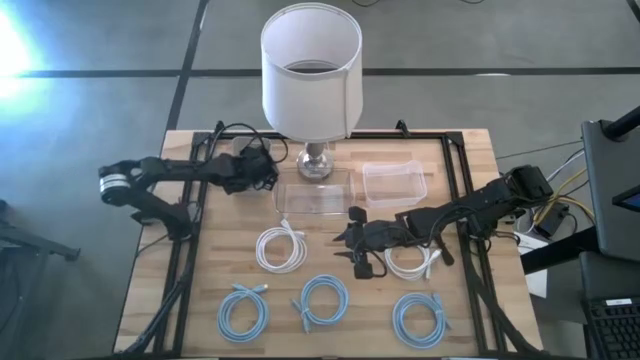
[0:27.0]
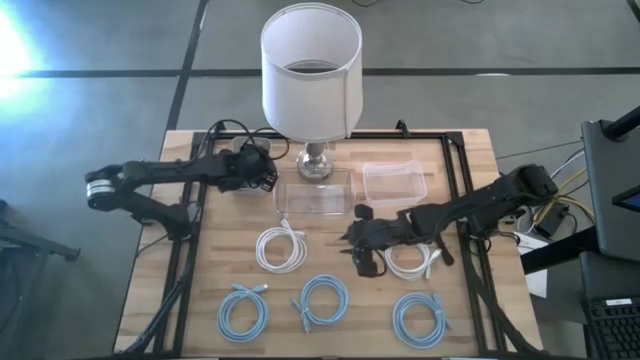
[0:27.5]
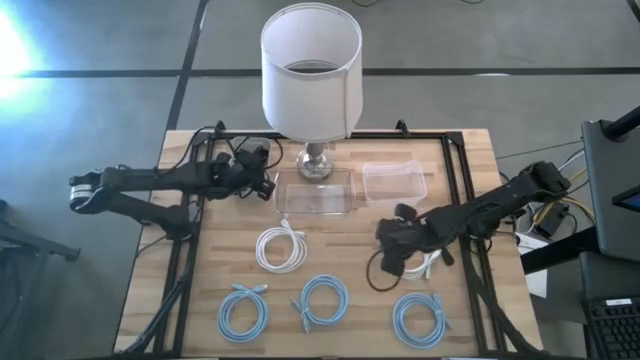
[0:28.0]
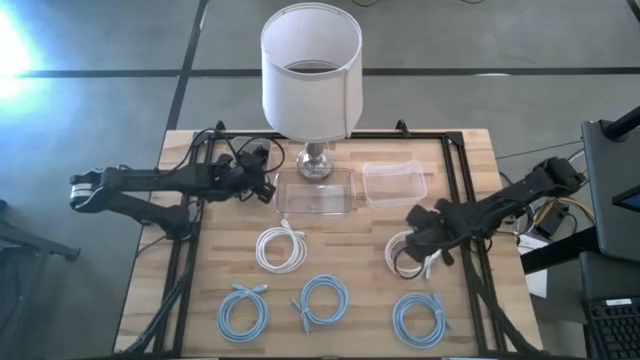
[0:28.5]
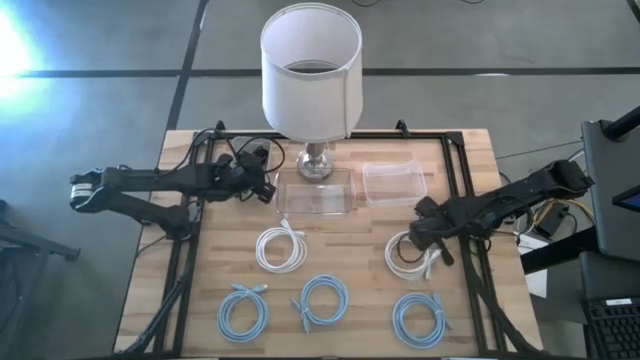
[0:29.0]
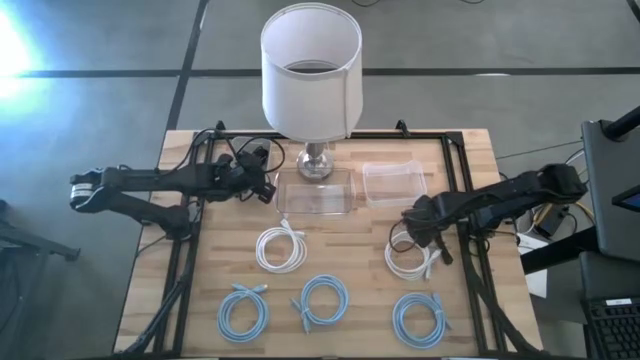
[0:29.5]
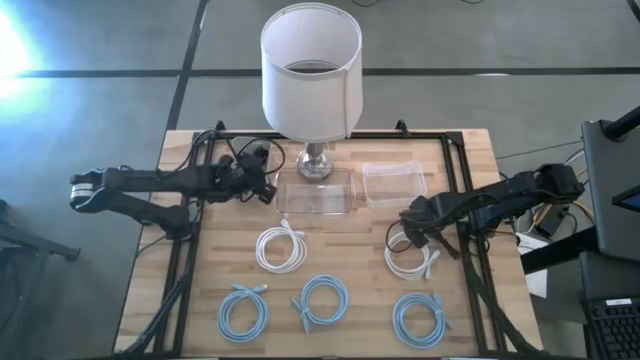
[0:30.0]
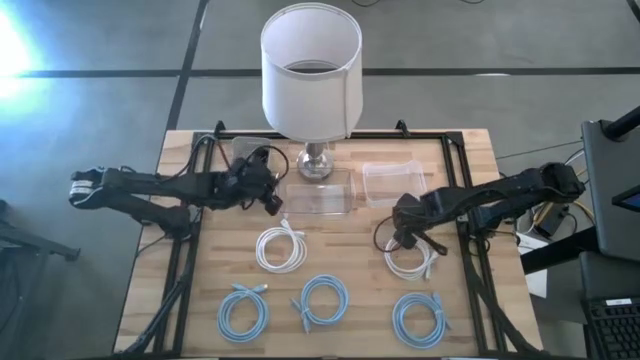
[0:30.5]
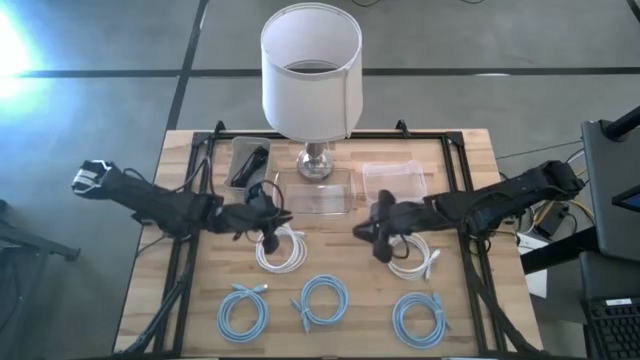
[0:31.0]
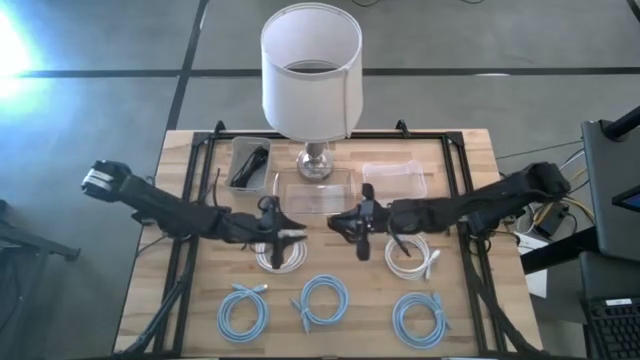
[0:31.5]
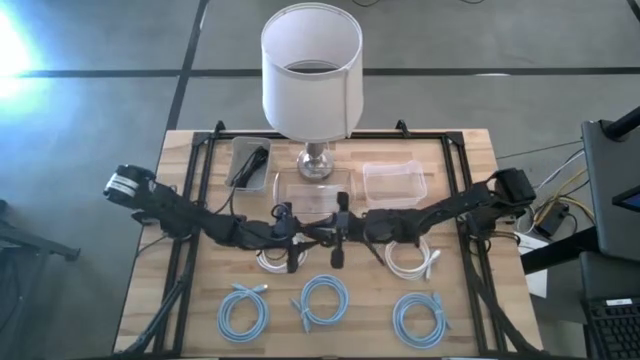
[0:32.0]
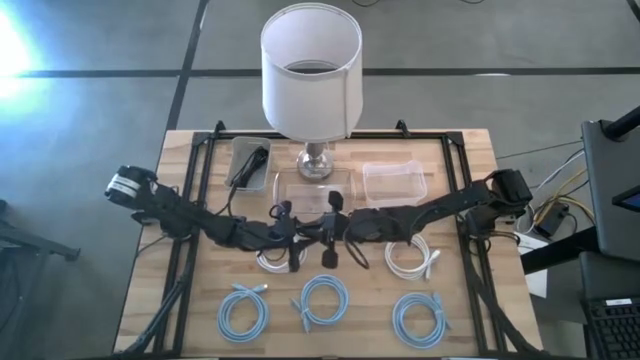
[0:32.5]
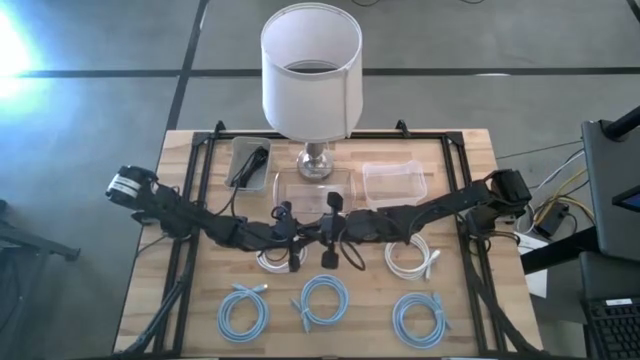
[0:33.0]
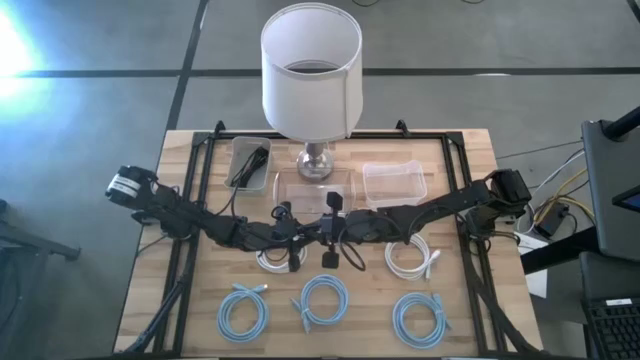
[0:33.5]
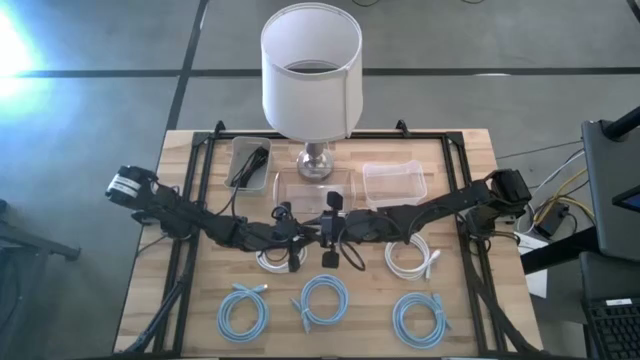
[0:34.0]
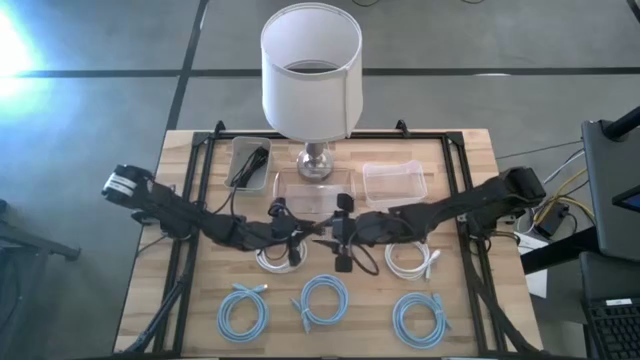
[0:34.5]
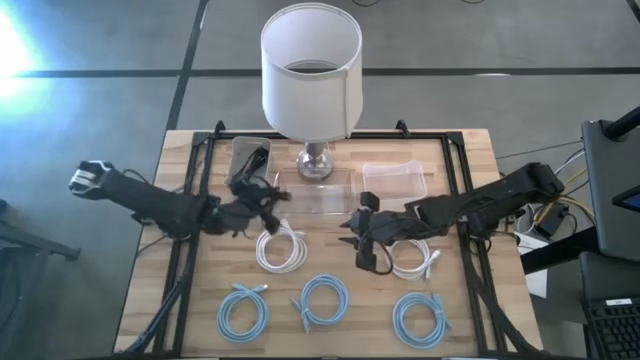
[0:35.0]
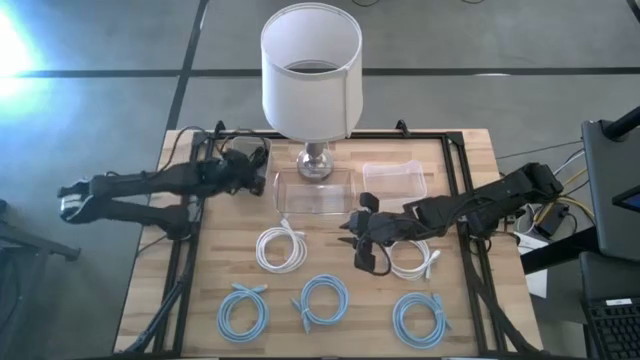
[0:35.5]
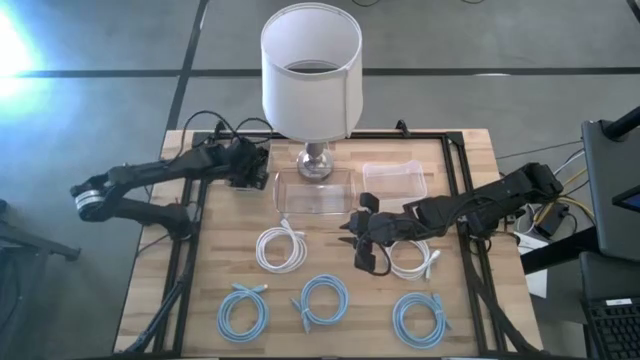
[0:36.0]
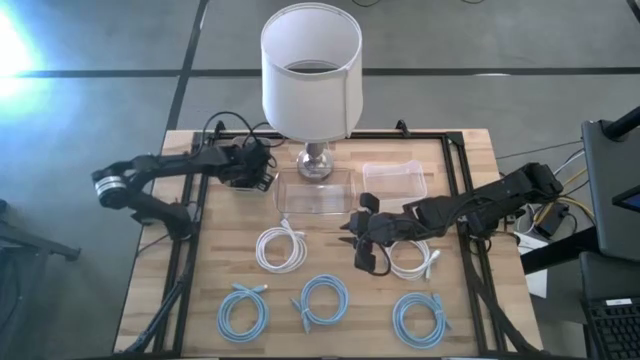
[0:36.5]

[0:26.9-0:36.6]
Task: Pick & Place USB Port
Put the black charger cable into the left bin

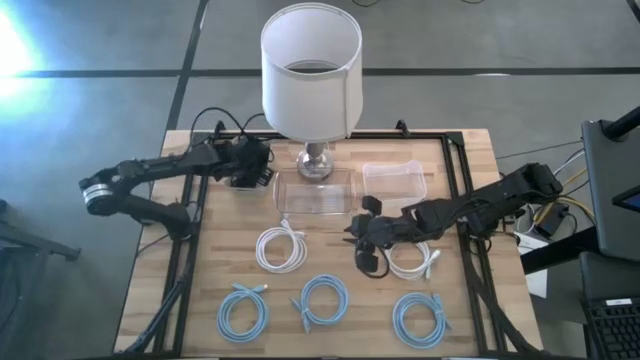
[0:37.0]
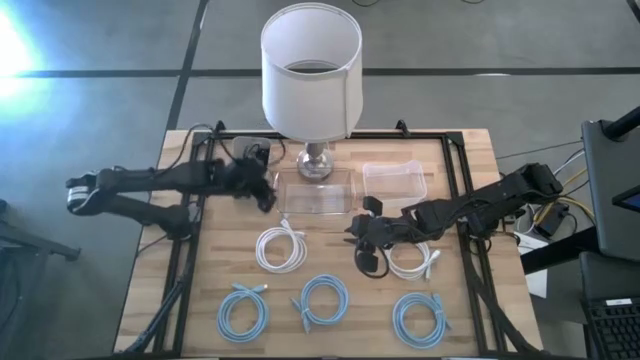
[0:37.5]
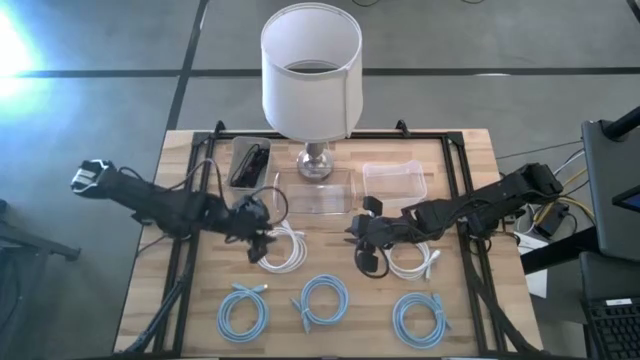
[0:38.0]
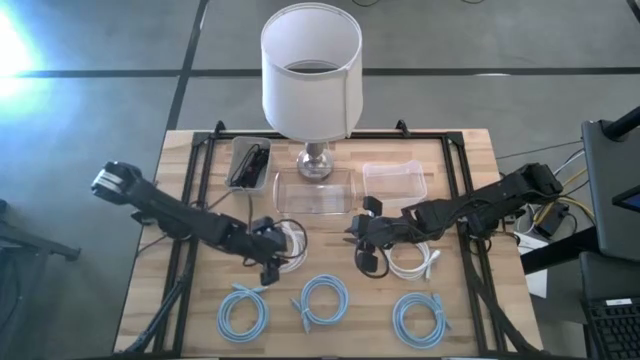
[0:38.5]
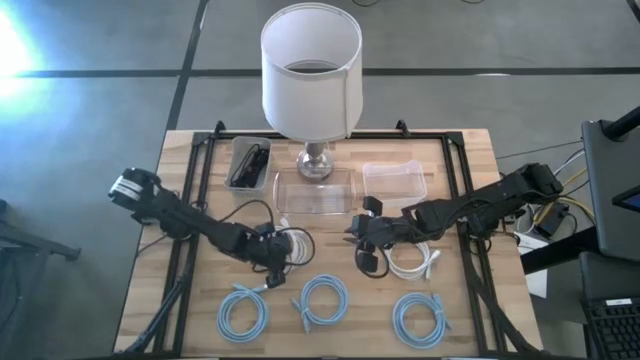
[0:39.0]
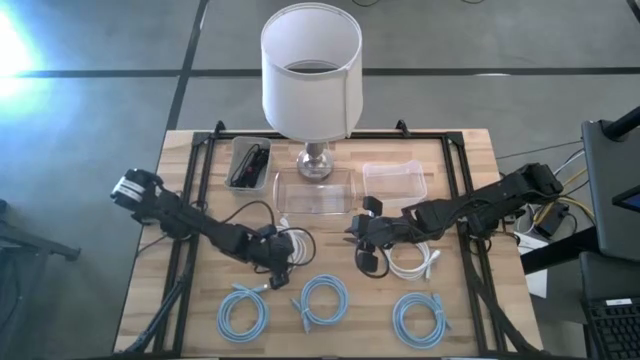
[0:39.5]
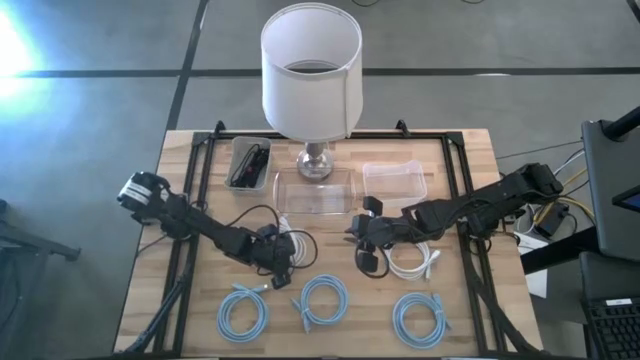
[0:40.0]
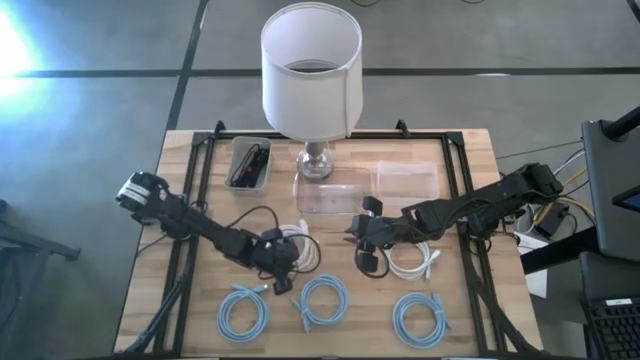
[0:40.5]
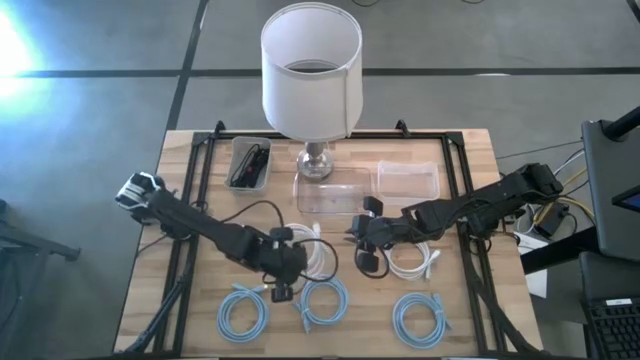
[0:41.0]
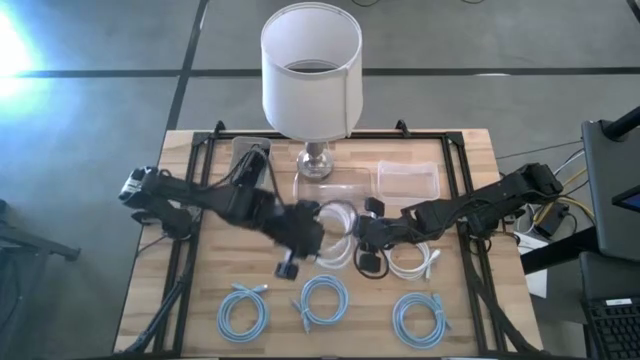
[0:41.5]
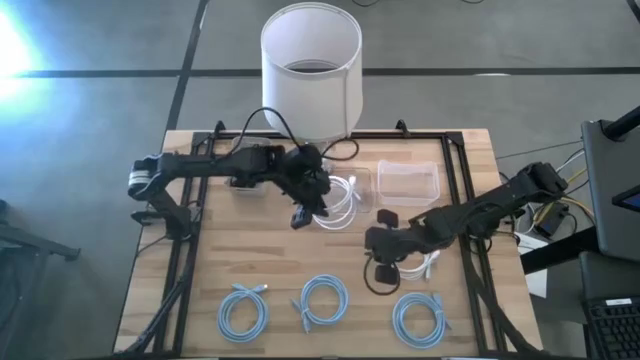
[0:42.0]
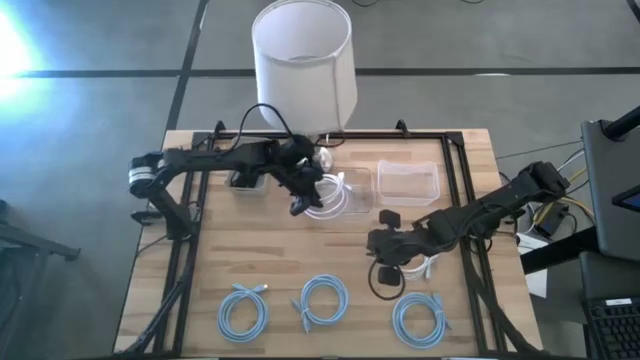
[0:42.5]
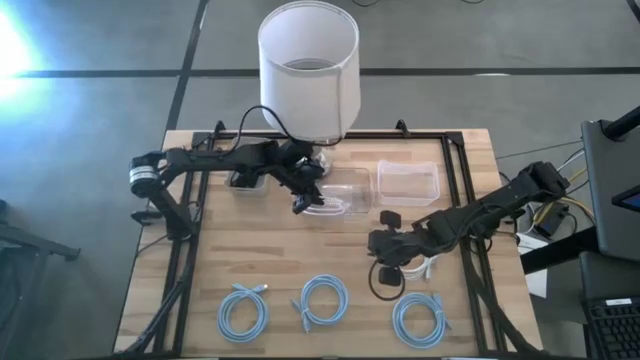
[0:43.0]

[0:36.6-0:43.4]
Put the left white display cable into the transparent bin

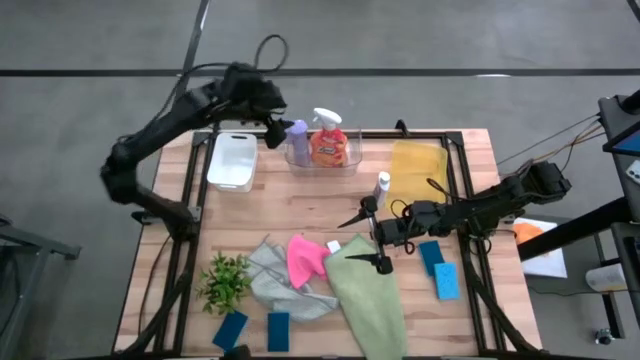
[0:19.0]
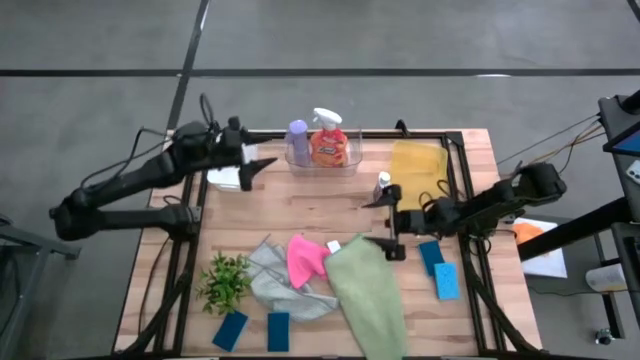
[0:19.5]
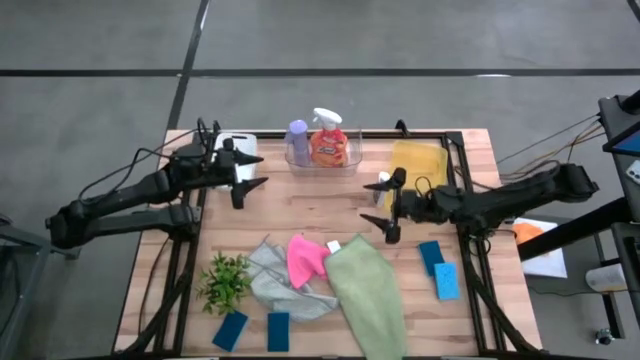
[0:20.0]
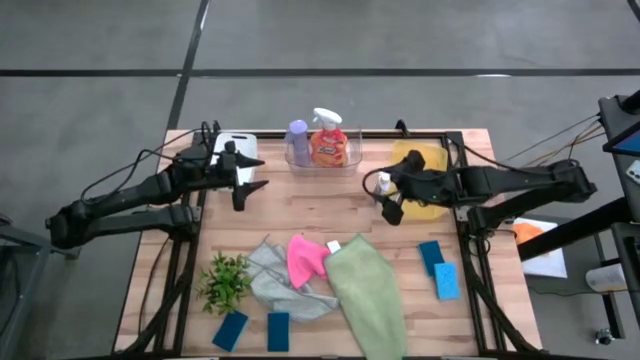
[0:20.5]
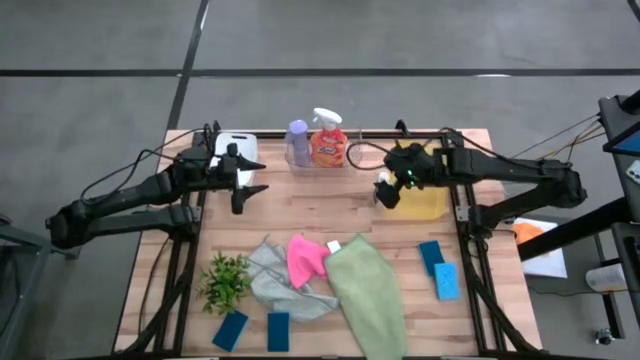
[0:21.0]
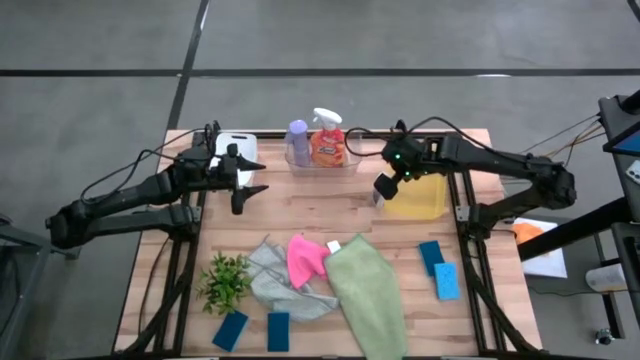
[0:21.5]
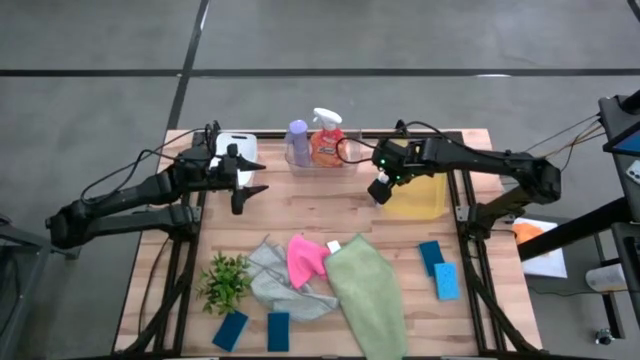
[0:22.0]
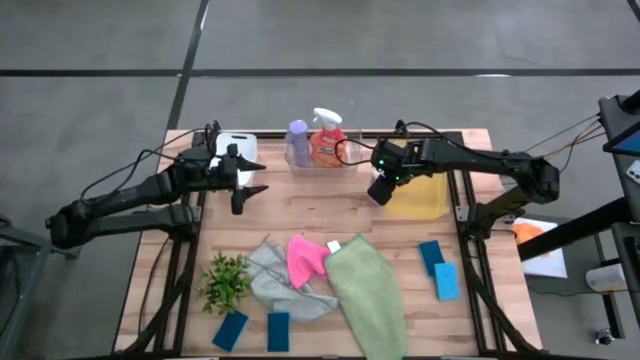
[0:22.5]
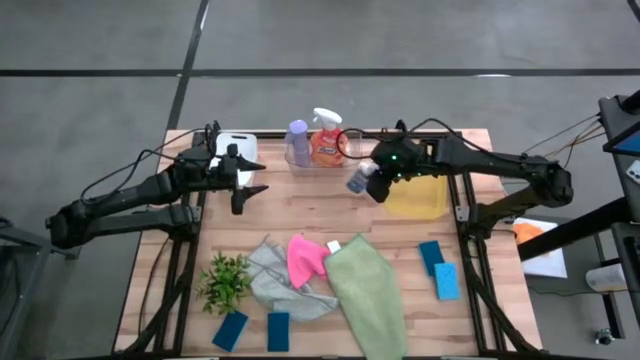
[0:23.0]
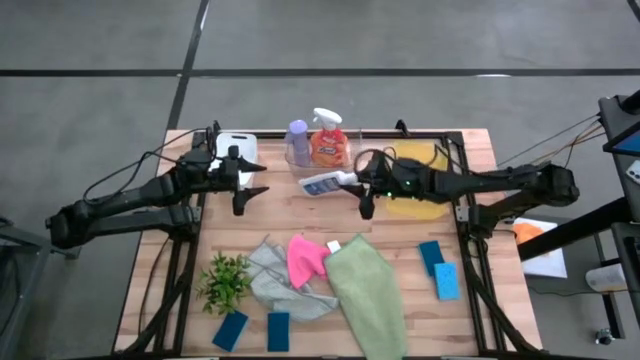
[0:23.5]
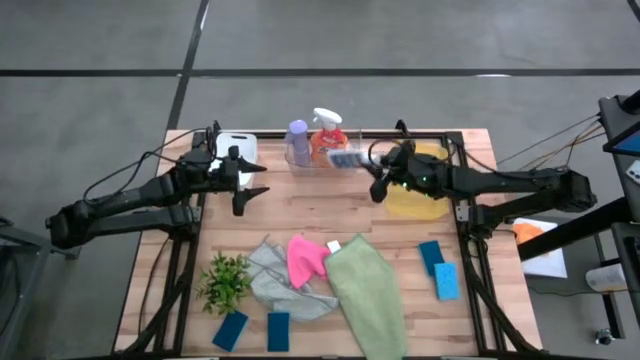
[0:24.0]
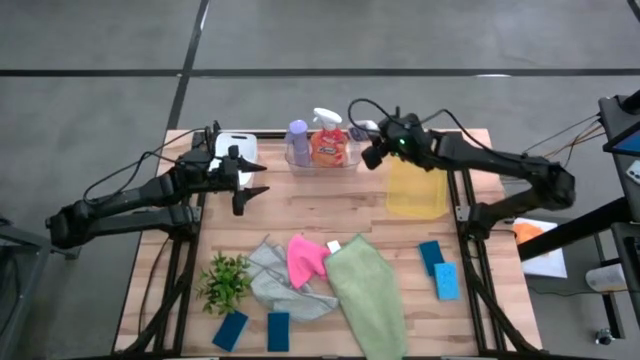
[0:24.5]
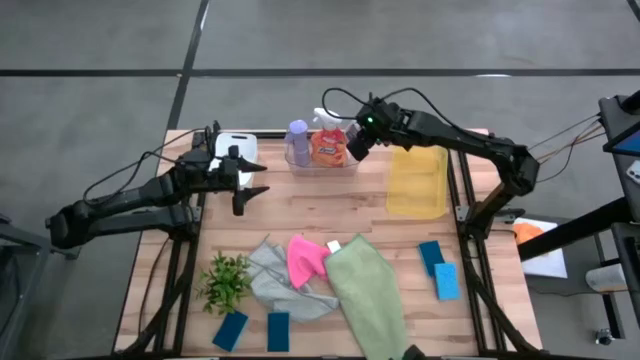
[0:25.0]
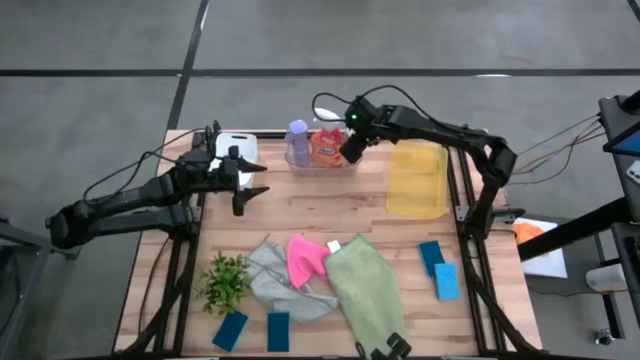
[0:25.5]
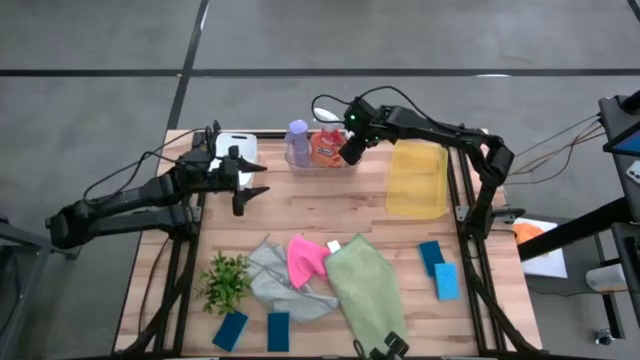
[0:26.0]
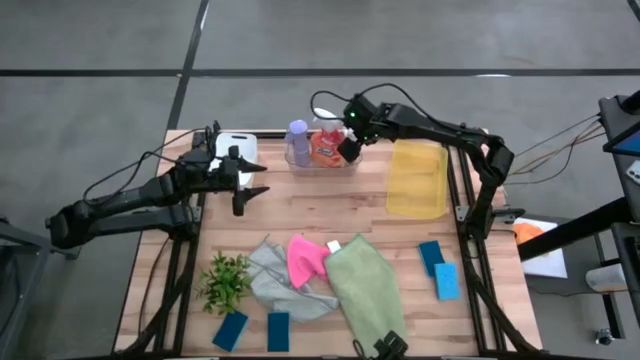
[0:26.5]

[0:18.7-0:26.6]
Task: Pick & Place Kitchen Items
Put the white plastic restorer bottle into the transparent bin
